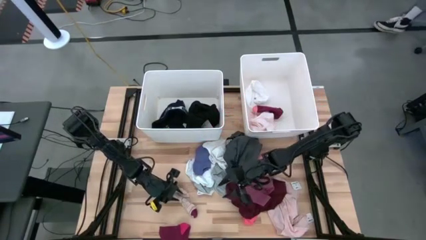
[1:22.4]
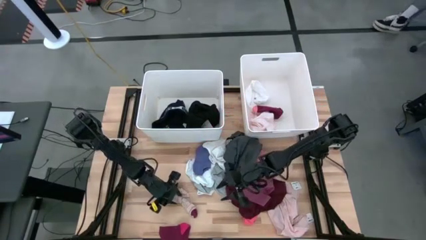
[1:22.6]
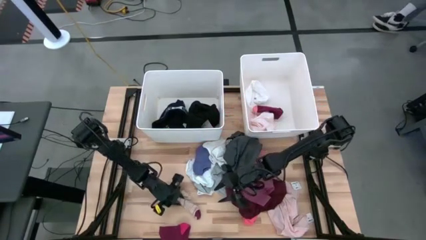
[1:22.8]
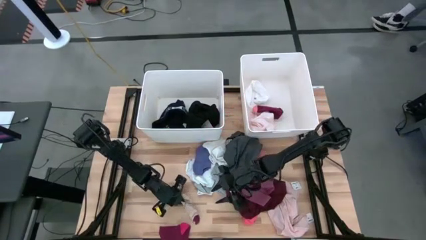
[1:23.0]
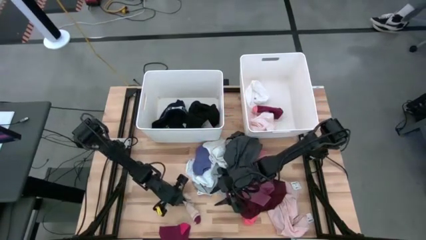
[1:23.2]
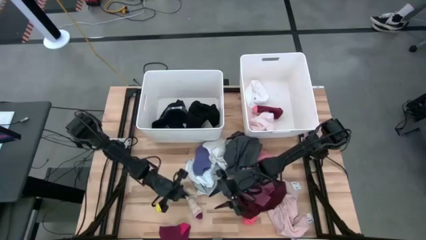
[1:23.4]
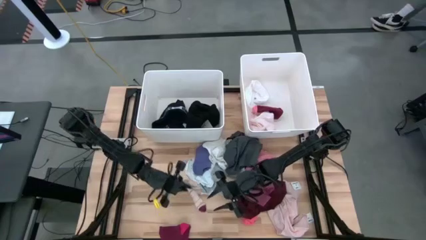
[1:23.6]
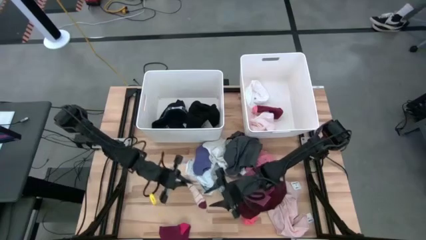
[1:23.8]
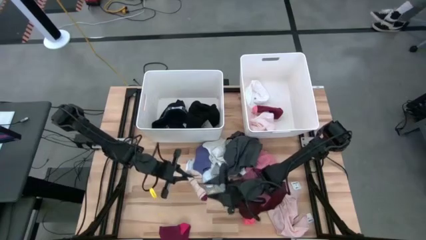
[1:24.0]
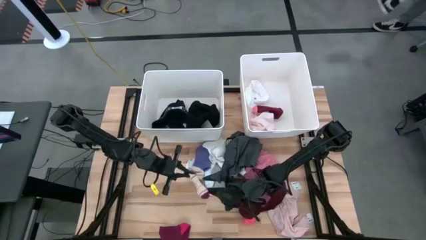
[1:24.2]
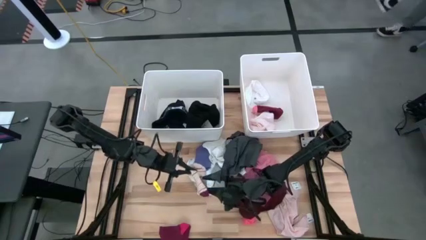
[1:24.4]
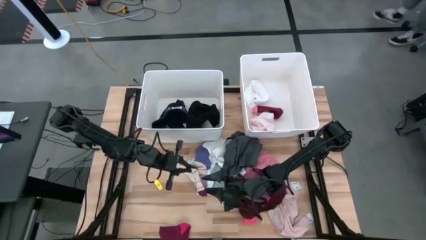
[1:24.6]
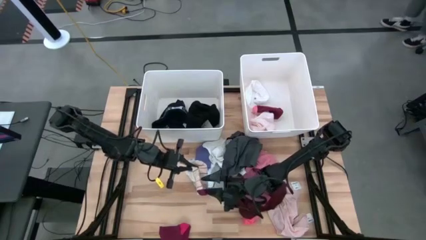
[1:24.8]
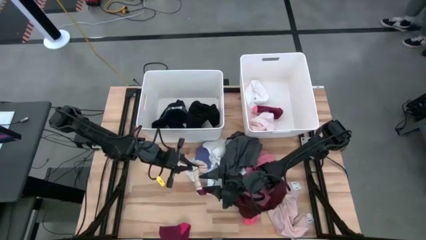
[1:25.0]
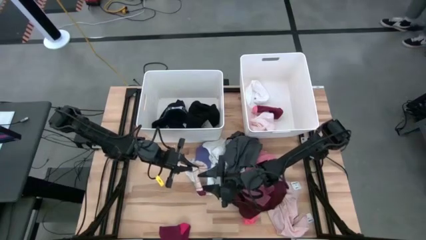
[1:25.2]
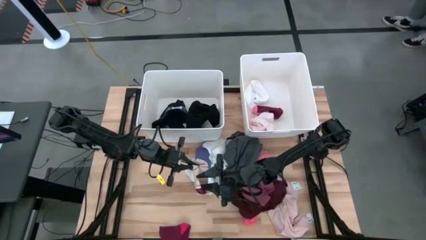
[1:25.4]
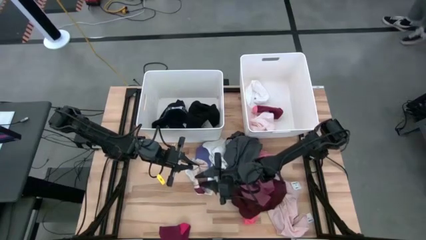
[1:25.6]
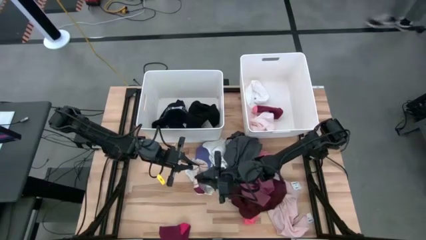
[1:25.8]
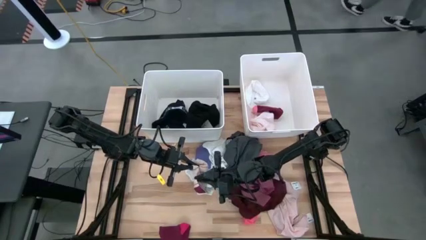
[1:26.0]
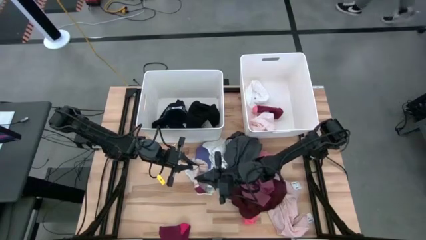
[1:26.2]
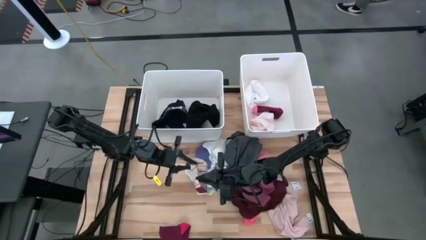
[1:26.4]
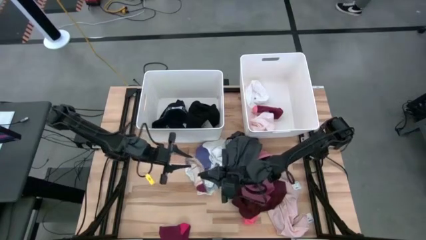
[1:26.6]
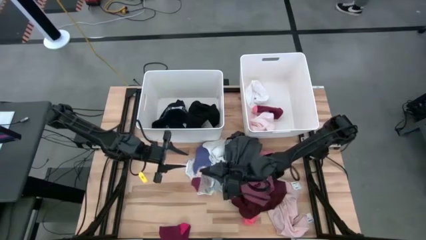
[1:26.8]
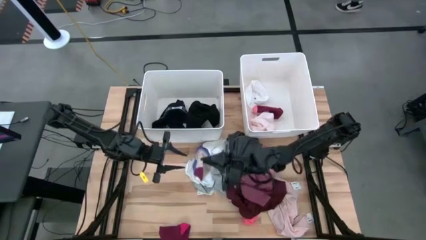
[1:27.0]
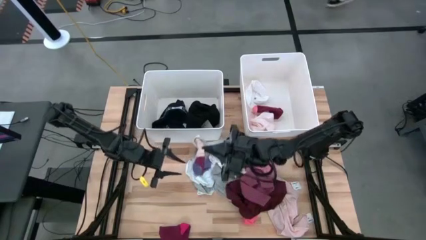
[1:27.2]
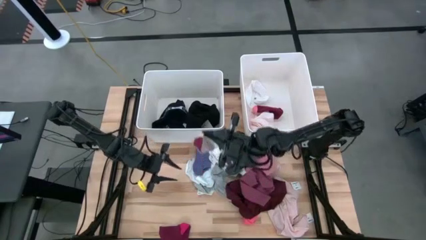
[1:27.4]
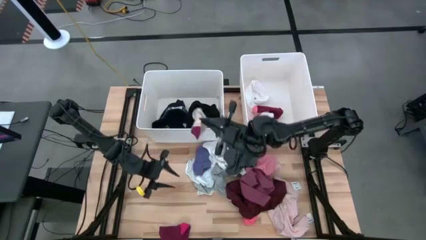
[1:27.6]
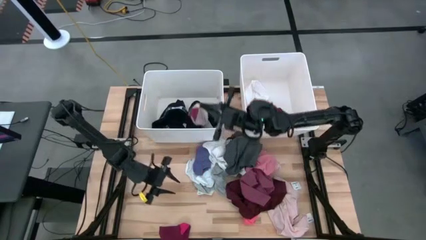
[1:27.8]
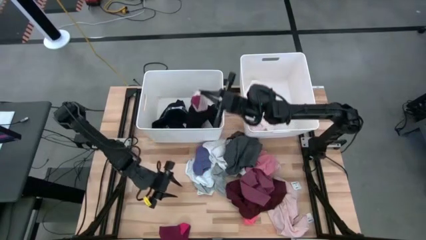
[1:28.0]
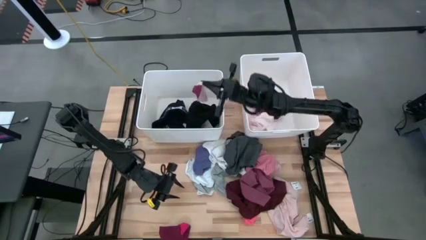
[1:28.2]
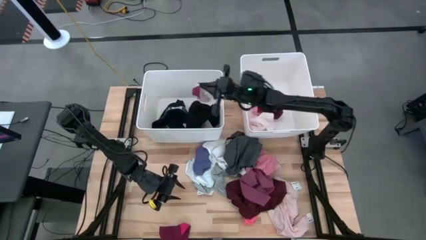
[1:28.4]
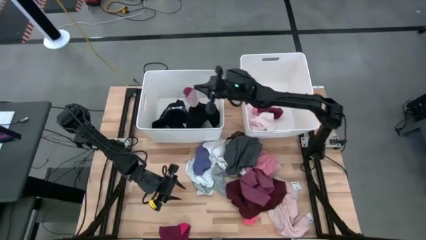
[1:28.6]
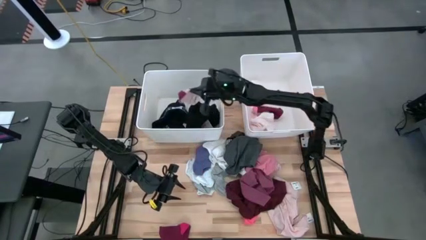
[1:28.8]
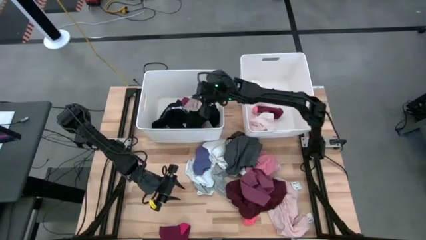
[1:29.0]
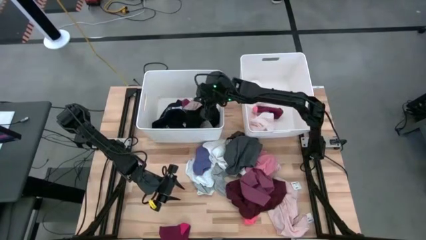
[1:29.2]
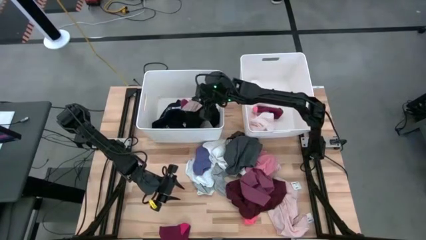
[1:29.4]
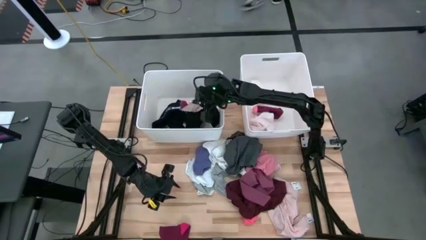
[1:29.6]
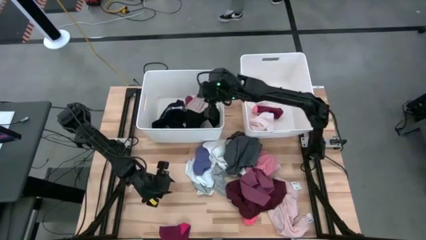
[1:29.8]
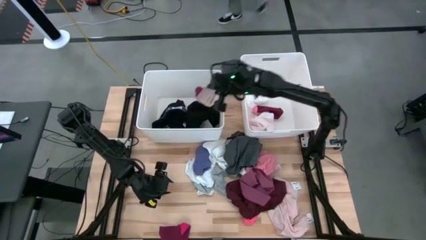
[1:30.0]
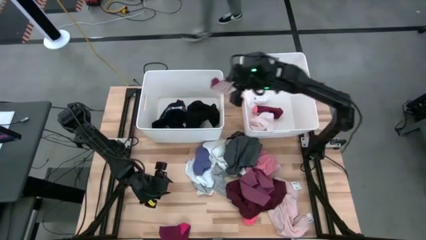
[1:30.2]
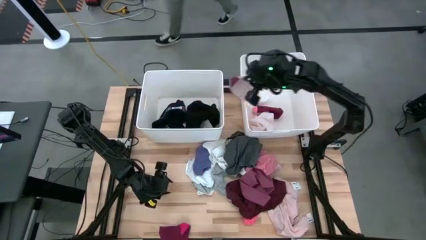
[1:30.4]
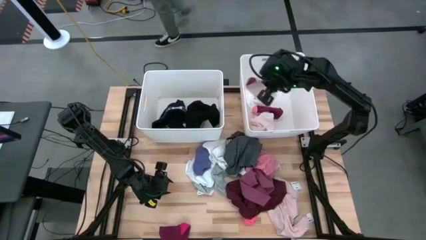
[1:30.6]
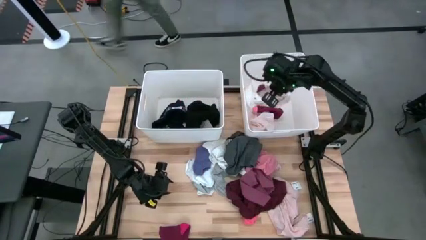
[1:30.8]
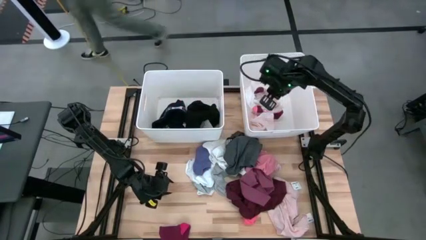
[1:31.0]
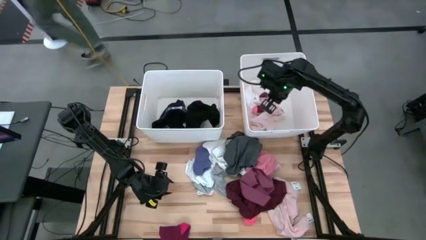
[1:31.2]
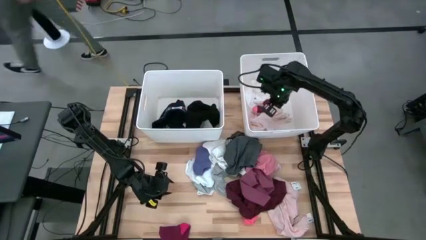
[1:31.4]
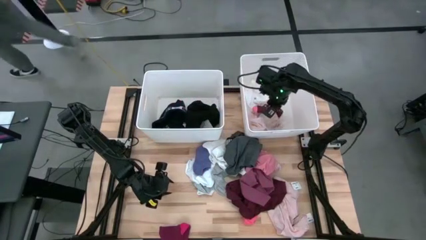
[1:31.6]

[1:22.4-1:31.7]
Task: Sort clothes
Put the light orange garment into the right white laundry organizer

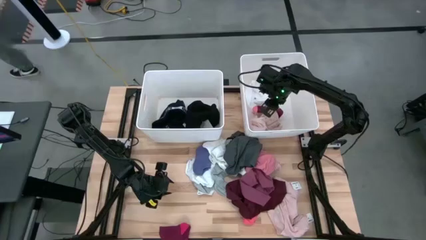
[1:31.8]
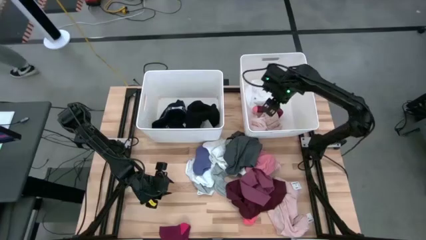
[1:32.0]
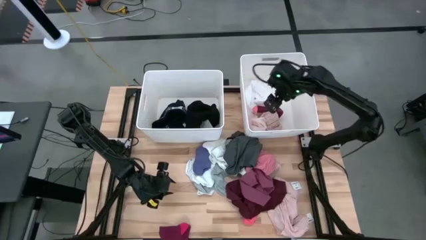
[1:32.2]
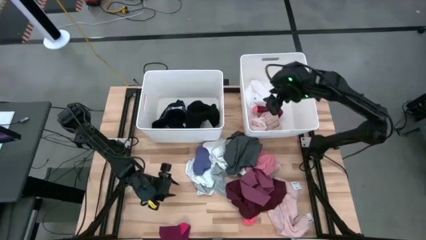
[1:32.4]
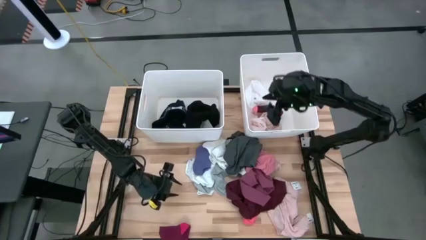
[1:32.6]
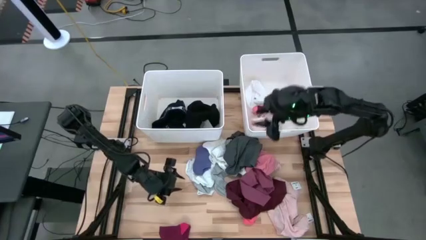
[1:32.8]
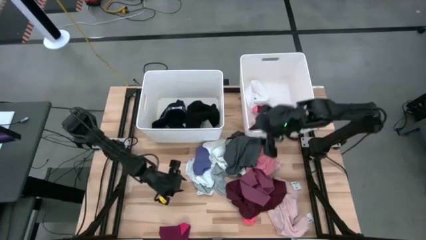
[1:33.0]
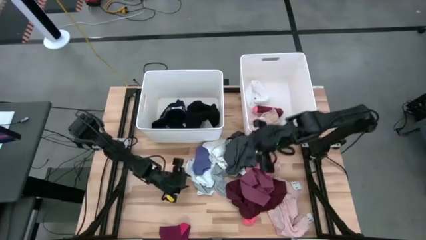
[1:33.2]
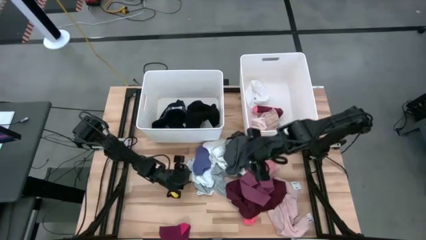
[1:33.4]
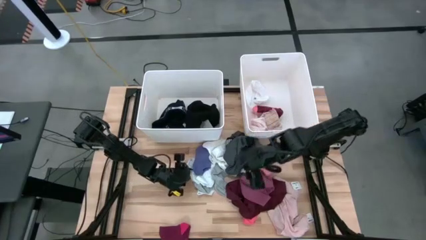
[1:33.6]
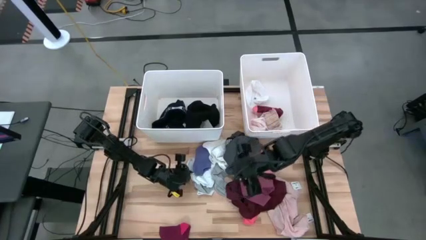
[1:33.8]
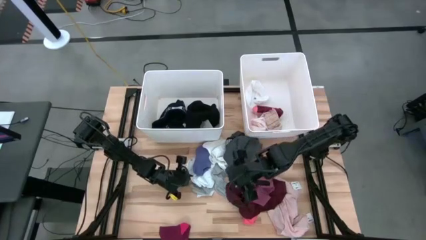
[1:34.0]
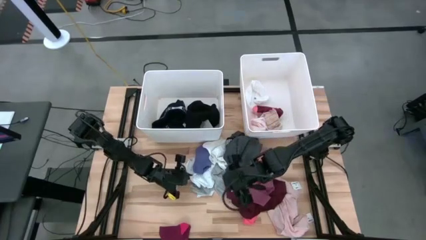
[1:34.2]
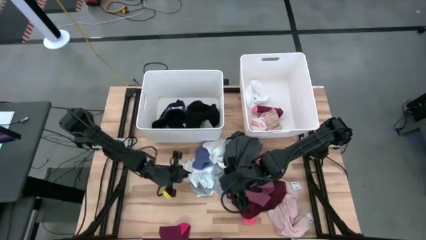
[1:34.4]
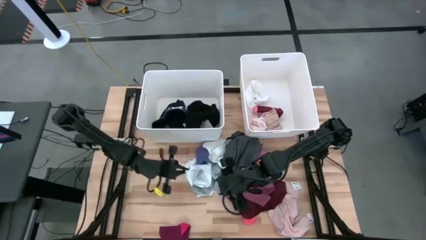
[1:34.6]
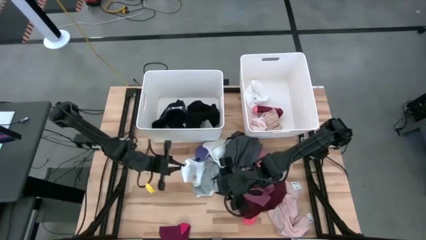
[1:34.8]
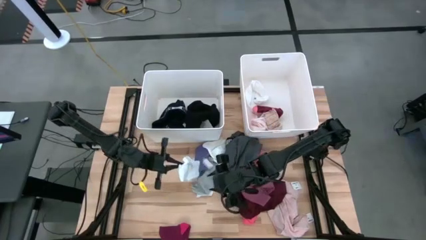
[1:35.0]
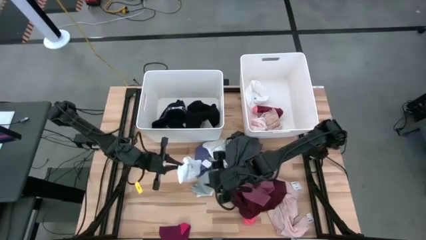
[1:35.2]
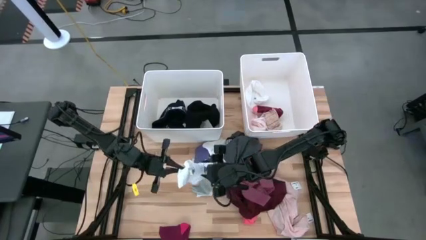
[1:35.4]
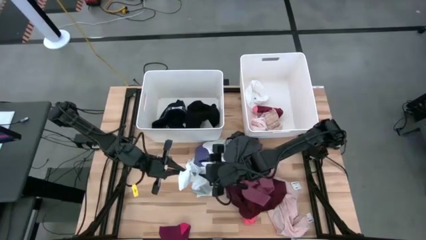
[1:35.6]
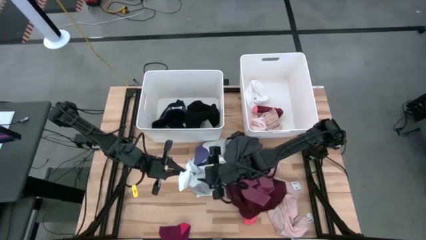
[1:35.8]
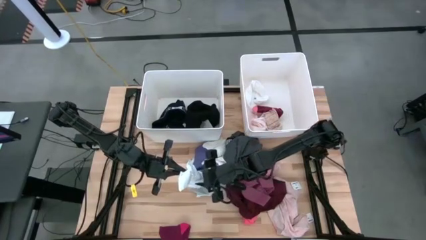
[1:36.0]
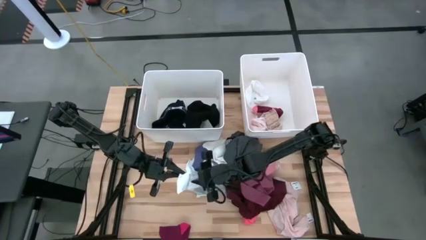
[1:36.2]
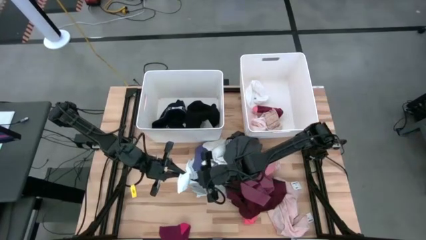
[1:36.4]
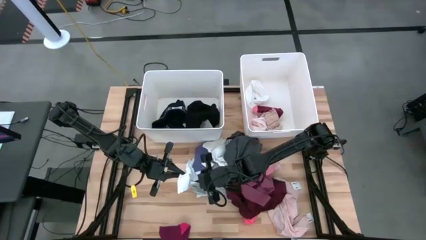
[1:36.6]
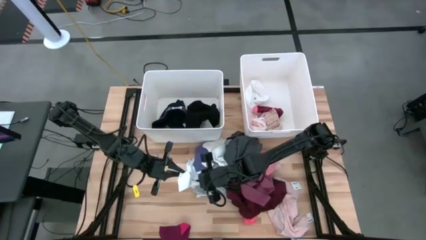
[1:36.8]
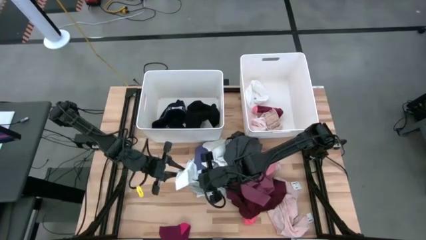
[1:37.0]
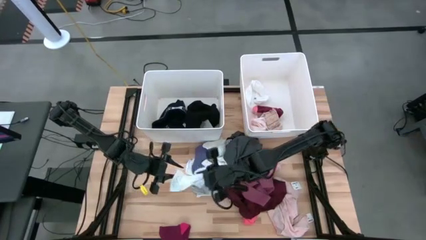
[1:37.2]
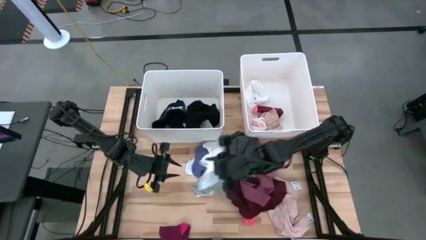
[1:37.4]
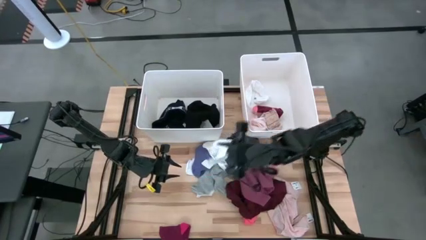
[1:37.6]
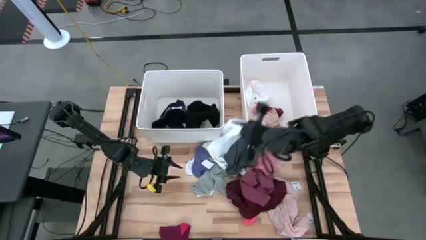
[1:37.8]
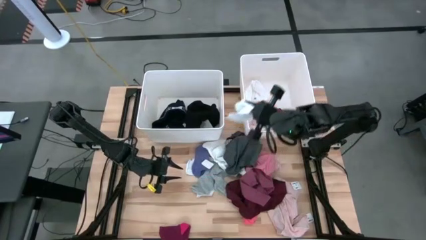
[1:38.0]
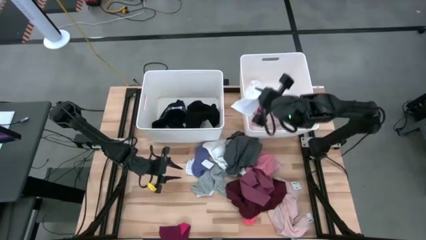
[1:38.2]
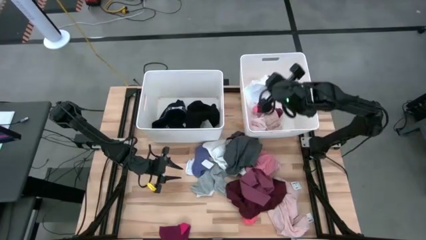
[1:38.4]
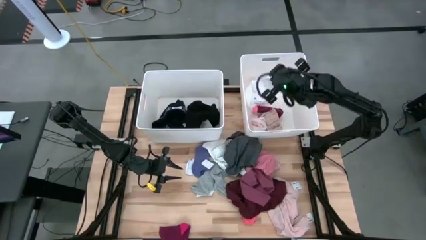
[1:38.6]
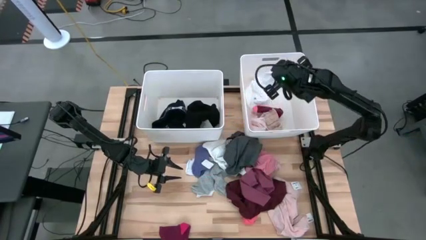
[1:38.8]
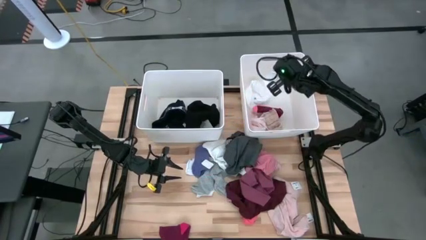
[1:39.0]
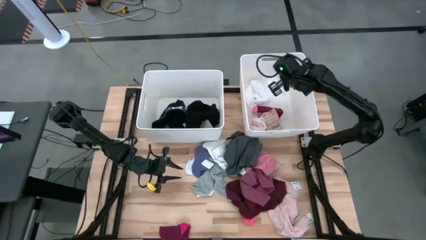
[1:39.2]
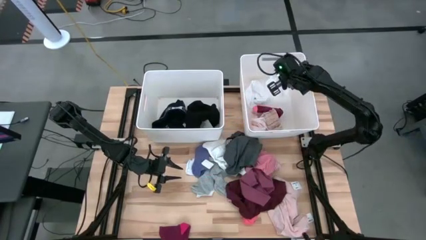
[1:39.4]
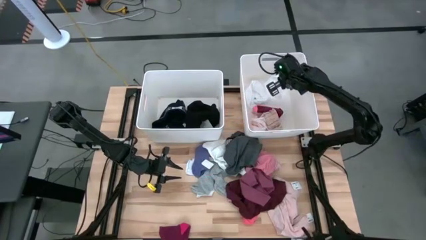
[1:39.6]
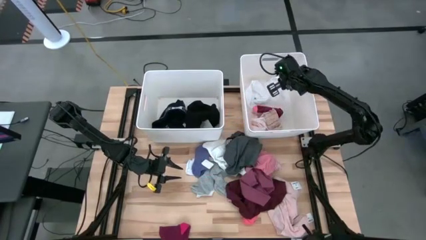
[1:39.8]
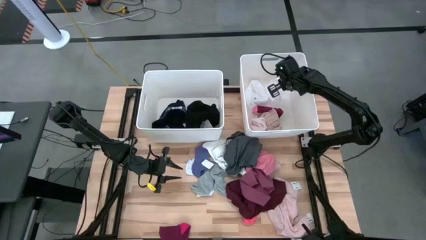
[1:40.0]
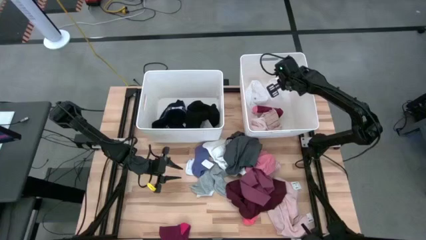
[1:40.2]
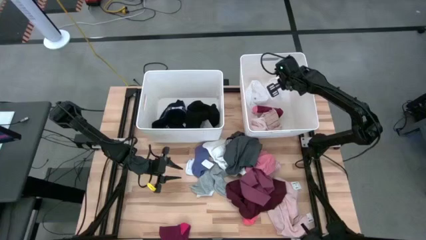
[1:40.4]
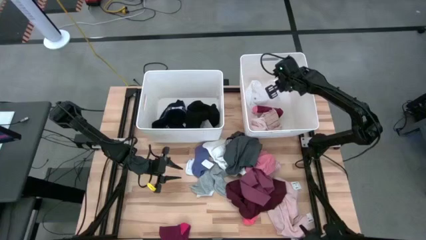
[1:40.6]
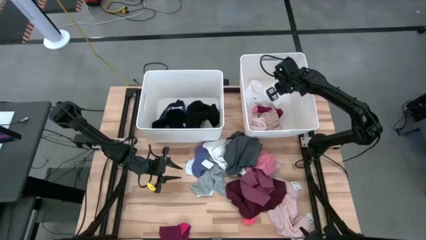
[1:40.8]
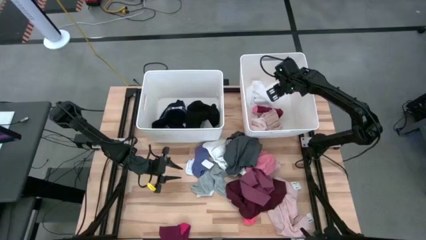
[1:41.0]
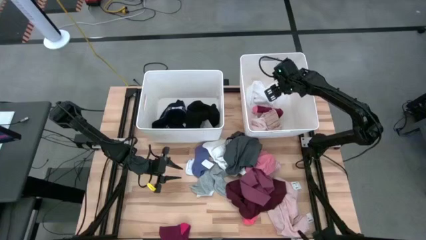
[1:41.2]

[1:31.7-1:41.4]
Put the white sock into the right white laundry organizer
